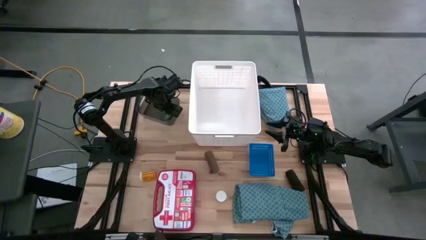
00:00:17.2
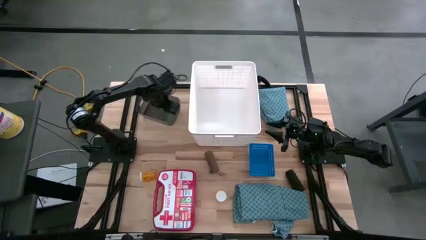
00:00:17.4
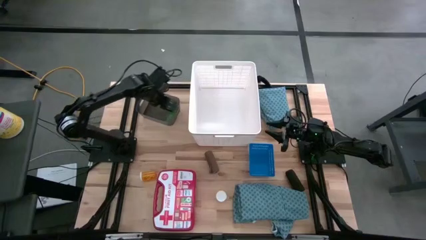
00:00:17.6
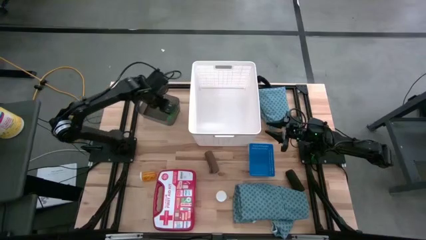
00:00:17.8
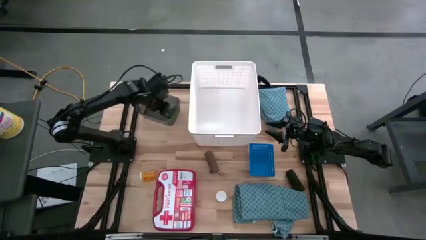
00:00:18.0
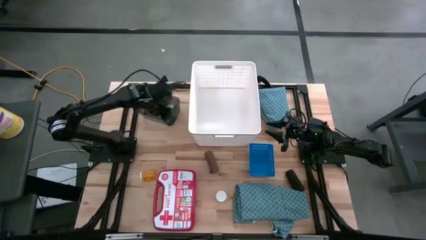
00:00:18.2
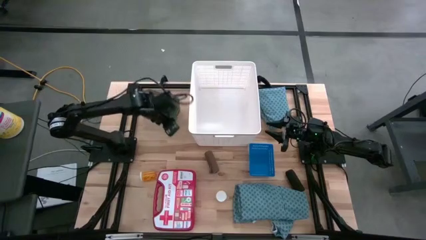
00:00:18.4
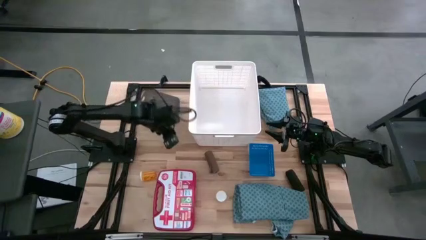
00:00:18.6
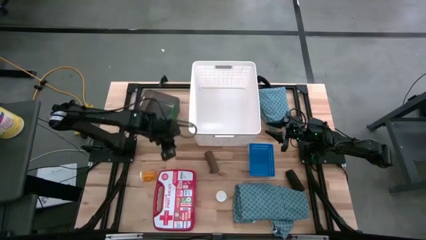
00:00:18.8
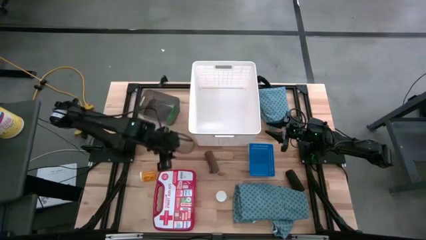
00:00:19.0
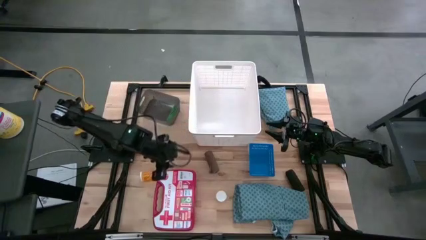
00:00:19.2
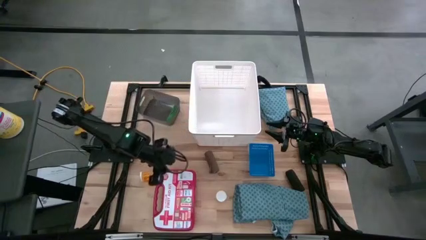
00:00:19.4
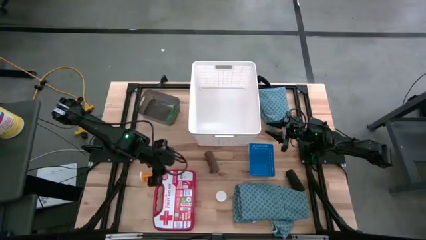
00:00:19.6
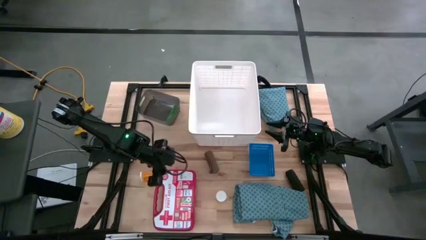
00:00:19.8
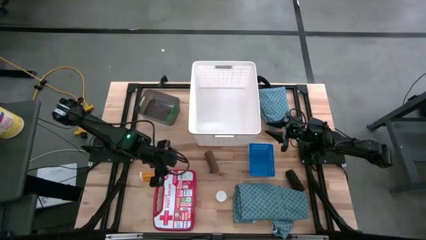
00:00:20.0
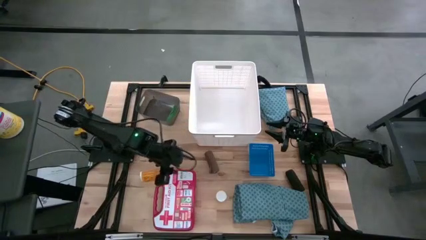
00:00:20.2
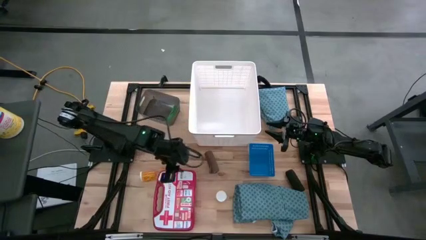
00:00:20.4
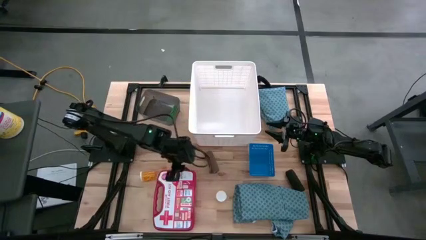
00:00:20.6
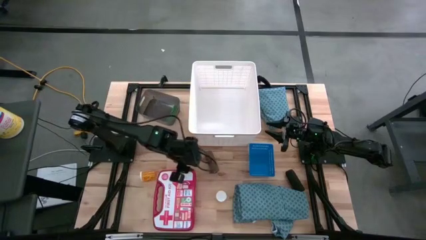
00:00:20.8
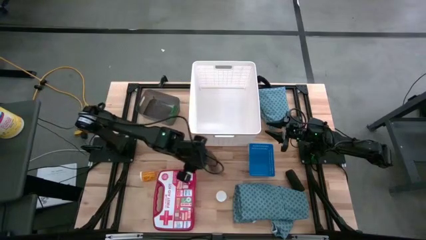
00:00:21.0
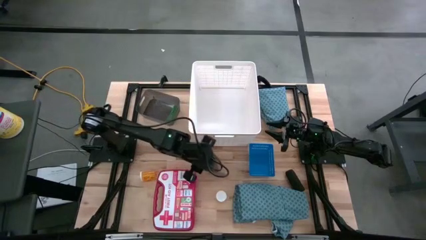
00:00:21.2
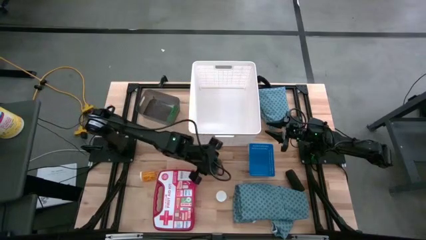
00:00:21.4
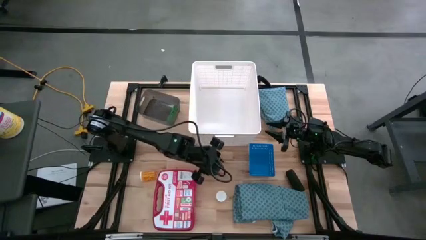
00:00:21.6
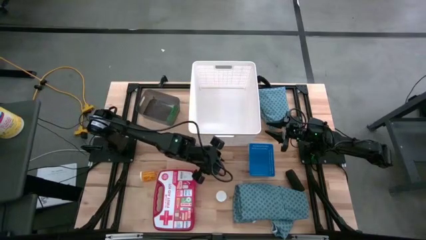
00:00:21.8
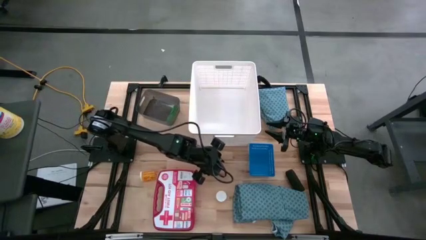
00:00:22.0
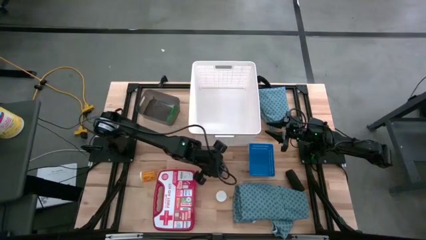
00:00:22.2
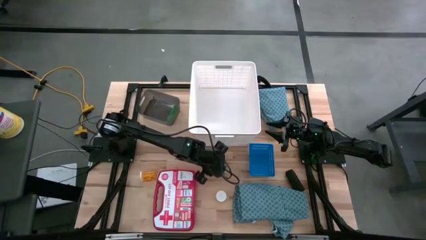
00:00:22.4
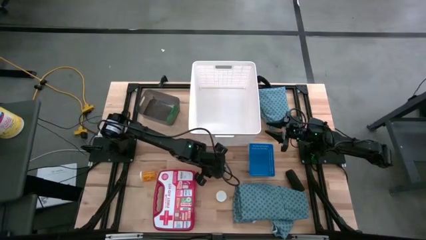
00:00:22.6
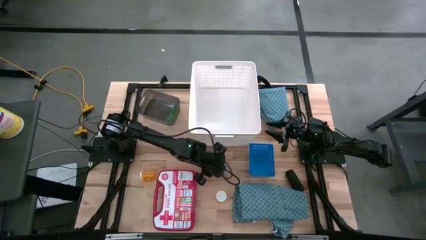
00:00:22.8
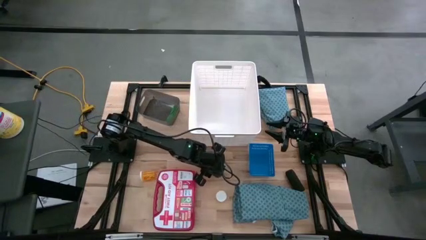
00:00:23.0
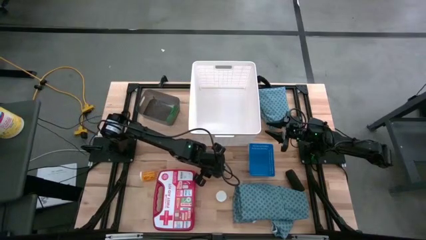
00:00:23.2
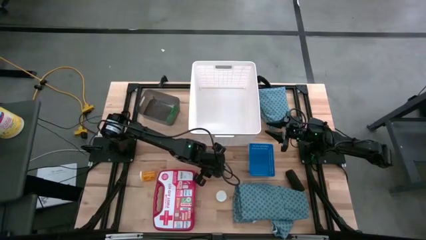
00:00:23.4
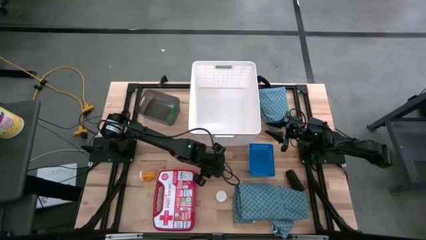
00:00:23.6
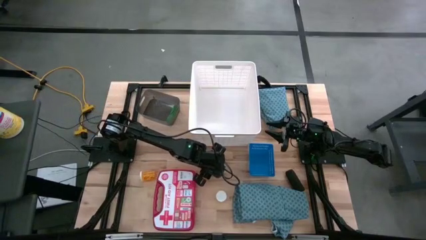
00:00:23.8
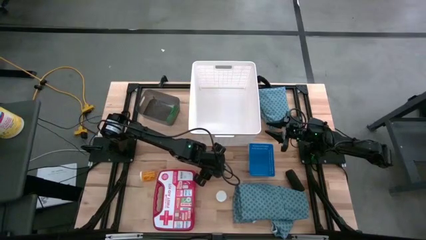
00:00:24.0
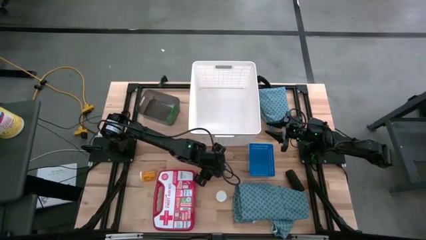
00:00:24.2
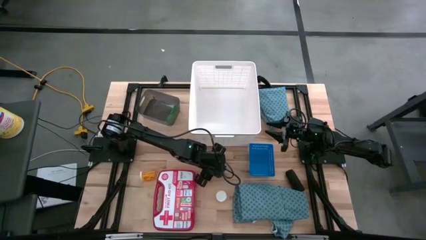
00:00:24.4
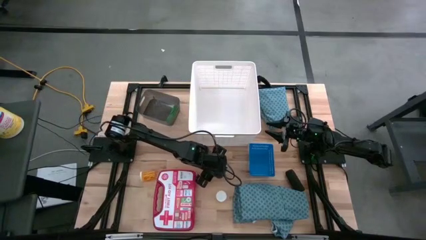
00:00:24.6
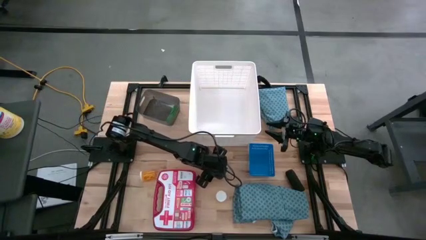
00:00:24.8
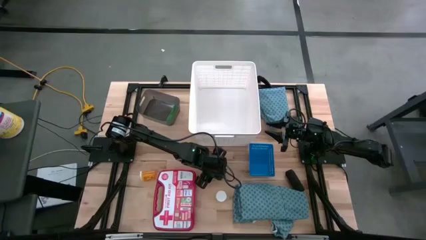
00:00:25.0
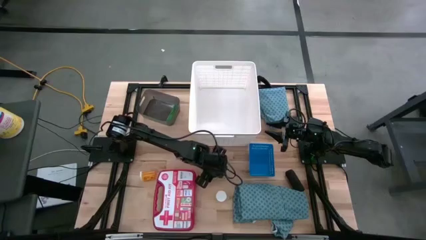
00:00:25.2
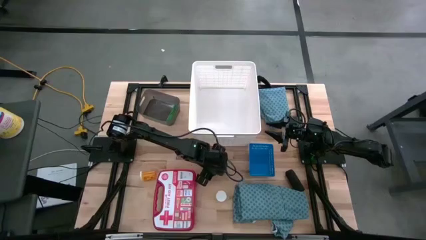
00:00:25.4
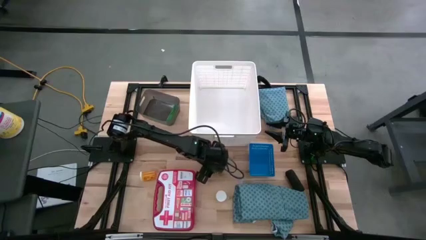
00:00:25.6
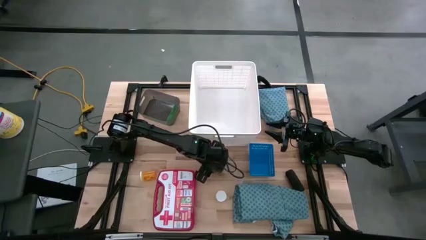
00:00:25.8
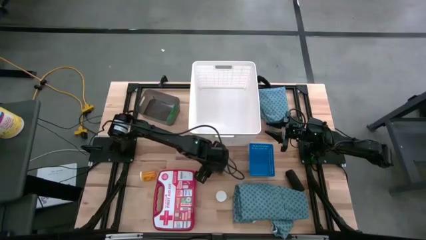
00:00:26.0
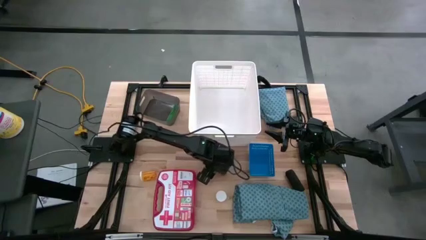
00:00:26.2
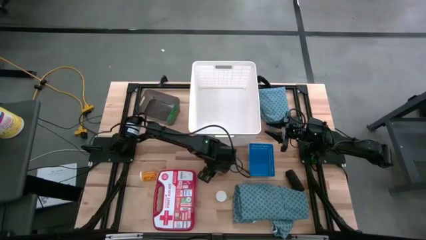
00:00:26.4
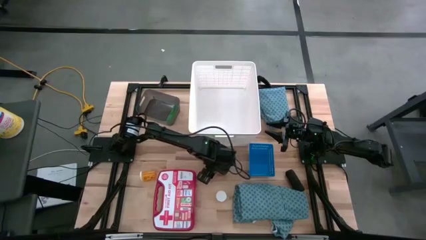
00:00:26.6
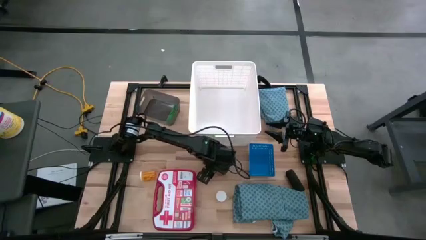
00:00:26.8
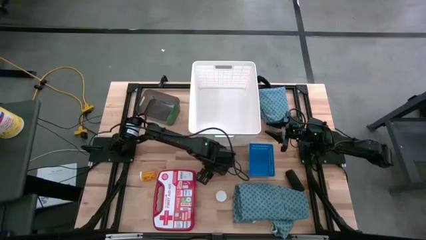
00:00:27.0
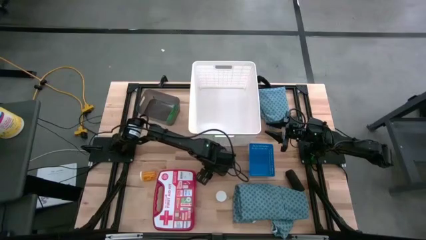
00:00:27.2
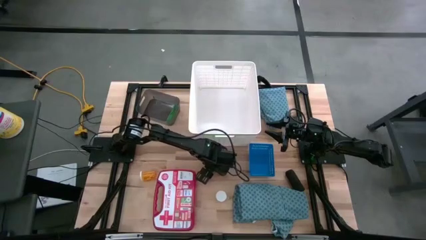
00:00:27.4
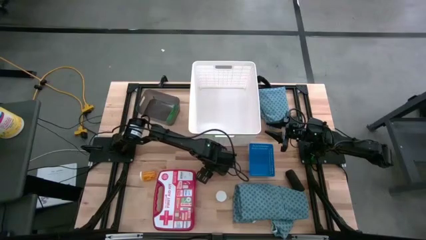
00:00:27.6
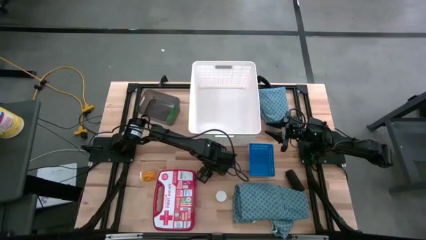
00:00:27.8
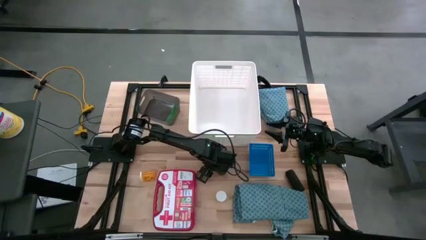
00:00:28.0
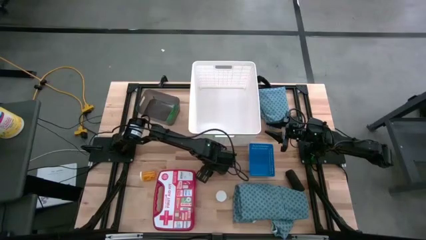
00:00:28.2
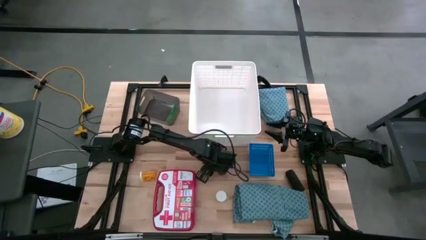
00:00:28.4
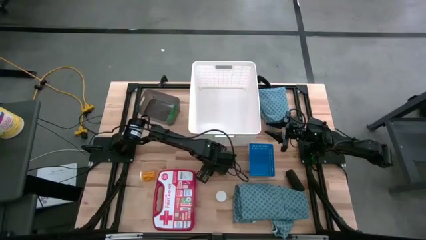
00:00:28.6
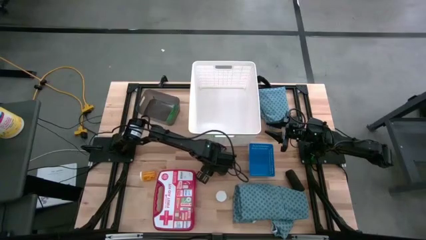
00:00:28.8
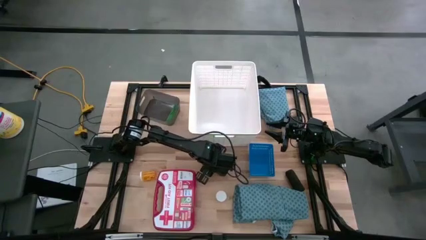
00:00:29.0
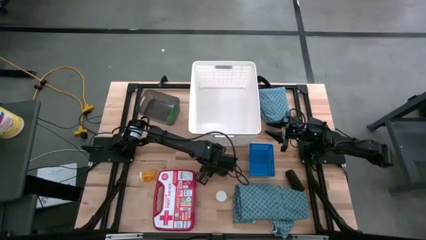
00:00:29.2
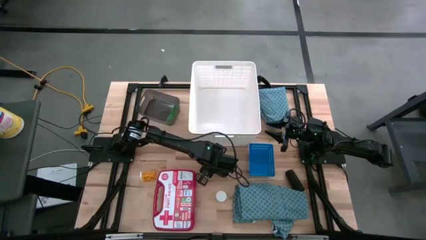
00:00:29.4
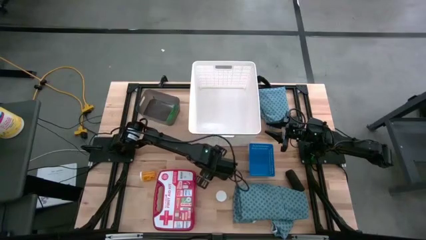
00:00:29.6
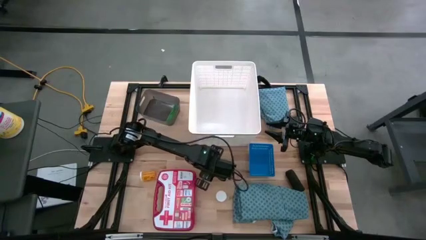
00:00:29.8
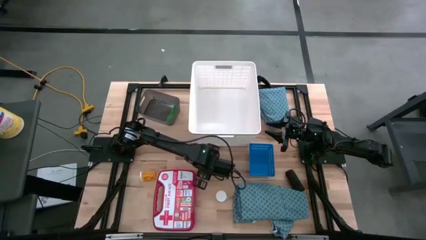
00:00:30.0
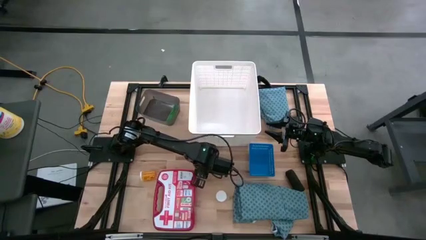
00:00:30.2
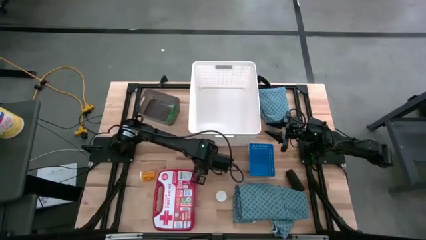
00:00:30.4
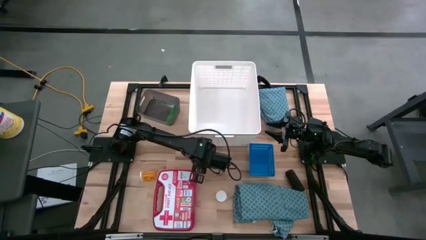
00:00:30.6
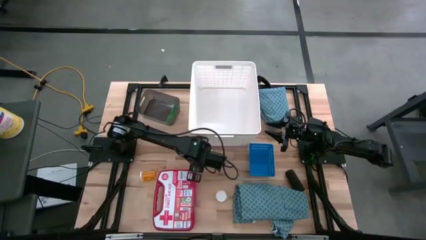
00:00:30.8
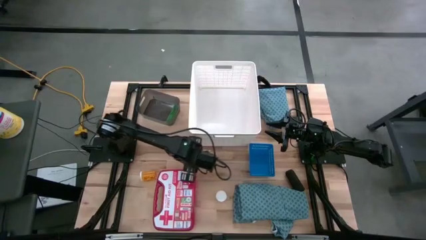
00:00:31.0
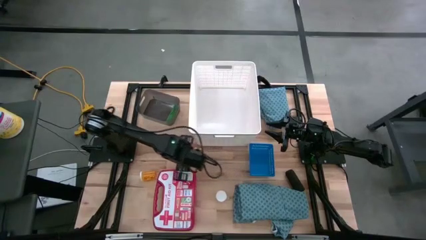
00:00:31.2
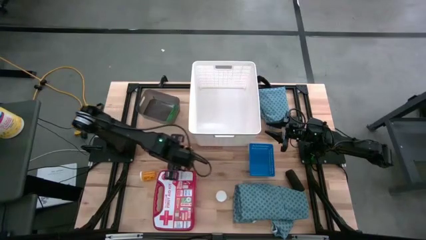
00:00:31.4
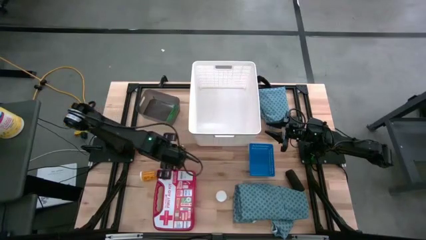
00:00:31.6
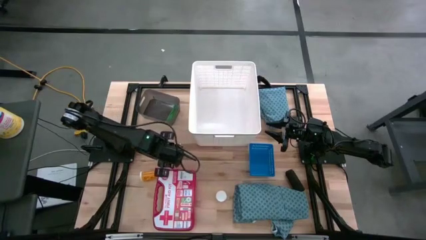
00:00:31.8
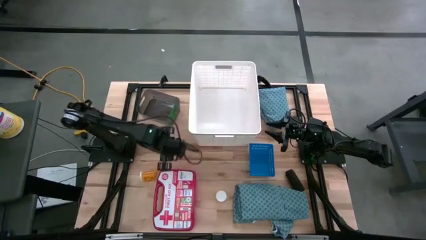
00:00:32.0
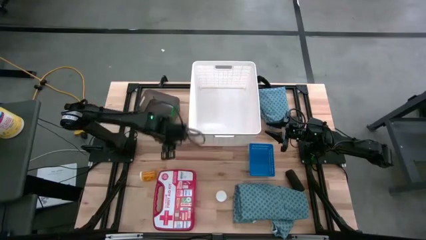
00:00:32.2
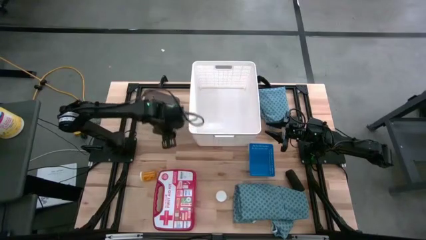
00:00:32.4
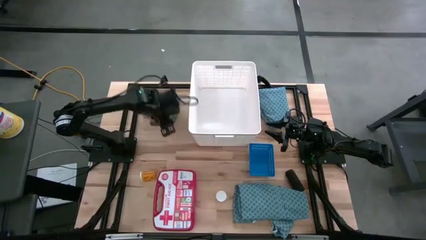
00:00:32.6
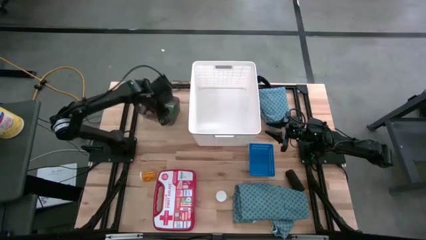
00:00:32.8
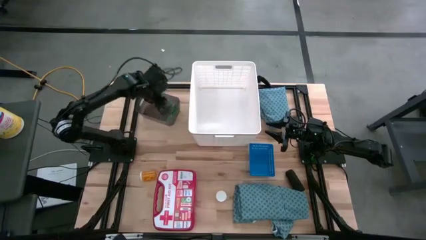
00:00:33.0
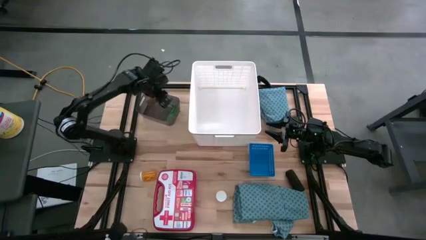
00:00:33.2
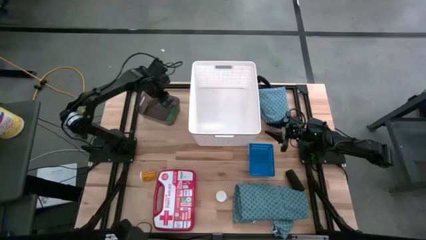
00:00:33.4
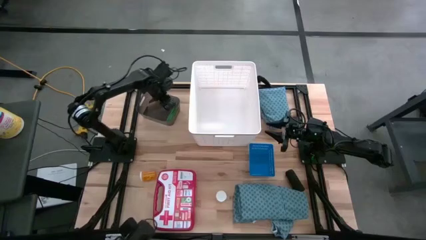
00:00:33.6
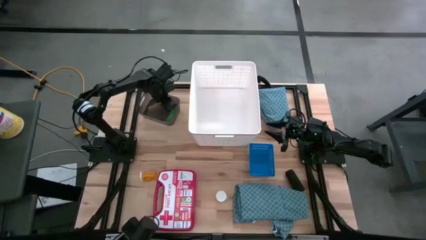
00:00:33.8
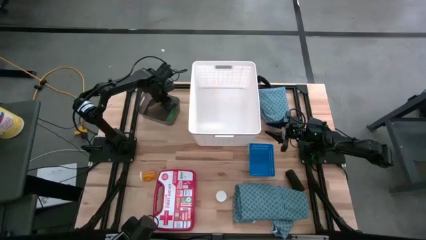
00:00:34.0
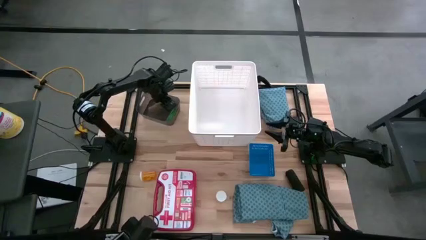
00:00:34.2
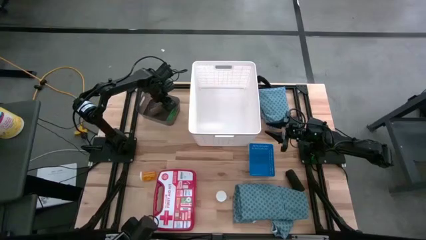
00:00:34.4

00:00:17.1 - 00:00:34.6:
Task: Pick & place medical supplies in basket/bin
Put the brown bandage into the black bin
